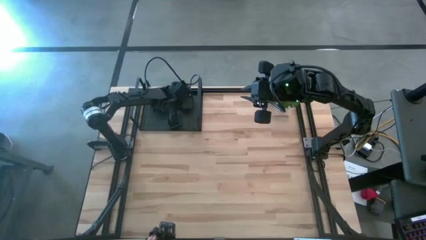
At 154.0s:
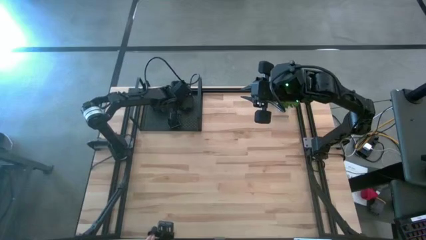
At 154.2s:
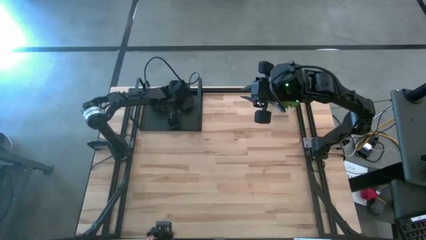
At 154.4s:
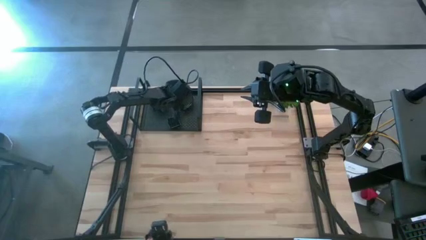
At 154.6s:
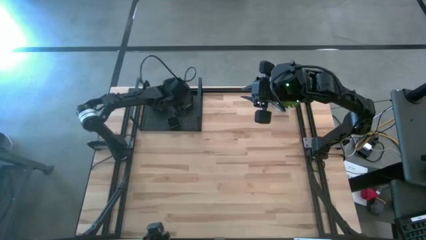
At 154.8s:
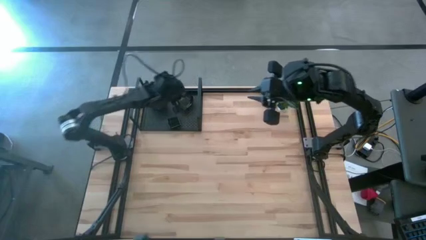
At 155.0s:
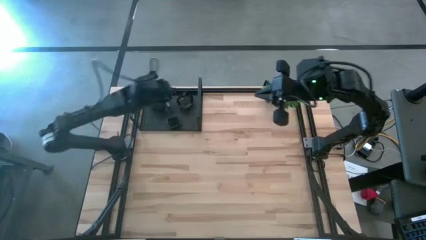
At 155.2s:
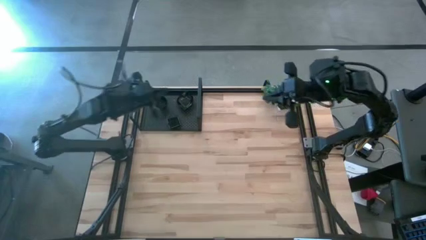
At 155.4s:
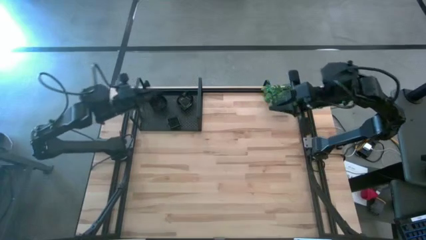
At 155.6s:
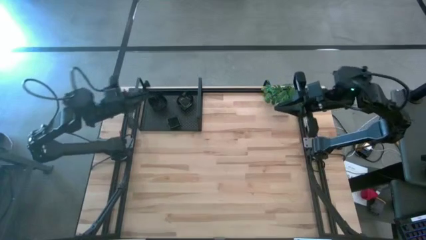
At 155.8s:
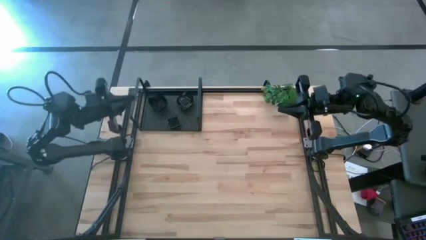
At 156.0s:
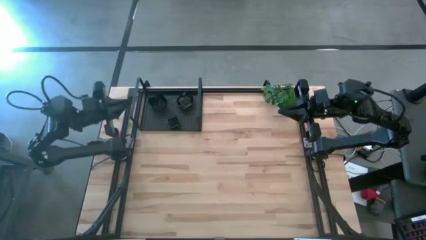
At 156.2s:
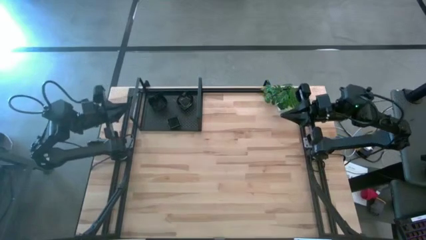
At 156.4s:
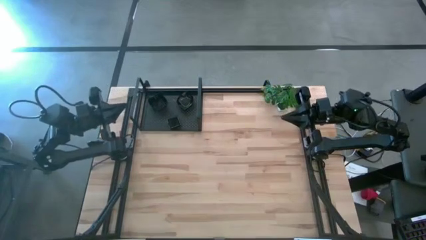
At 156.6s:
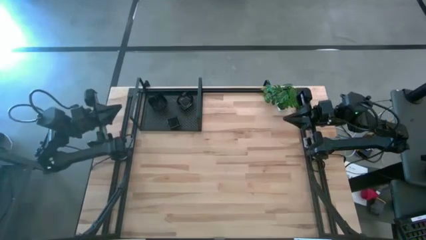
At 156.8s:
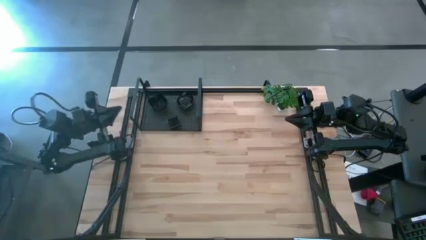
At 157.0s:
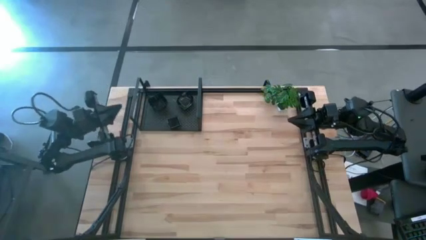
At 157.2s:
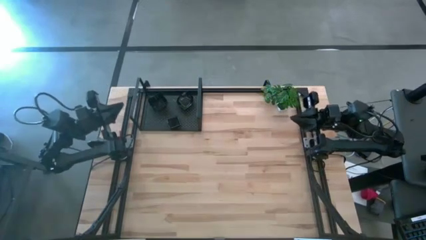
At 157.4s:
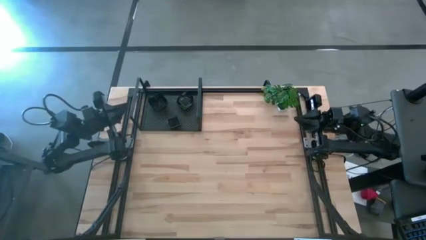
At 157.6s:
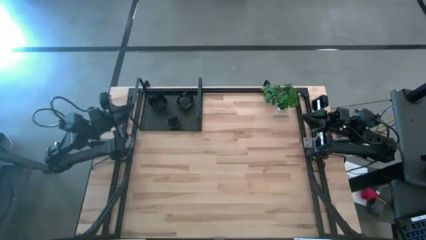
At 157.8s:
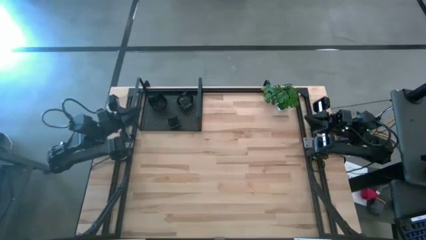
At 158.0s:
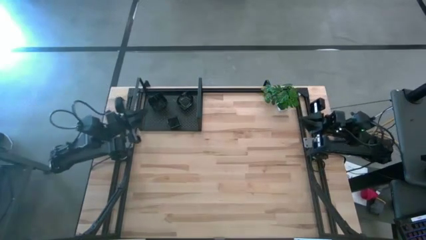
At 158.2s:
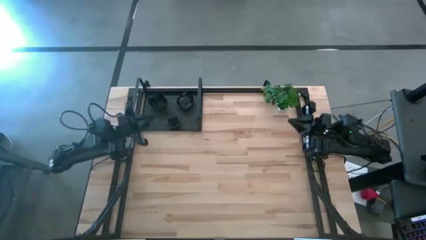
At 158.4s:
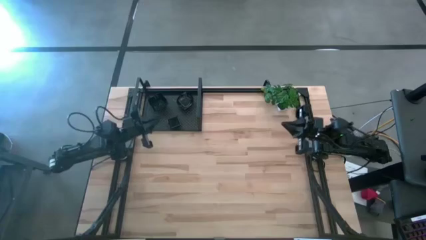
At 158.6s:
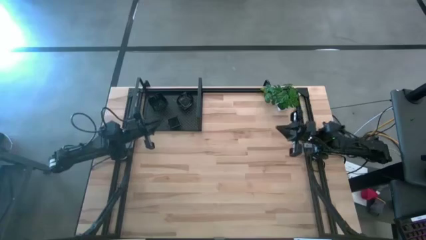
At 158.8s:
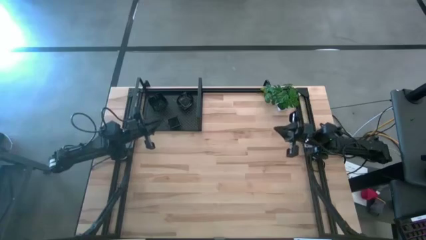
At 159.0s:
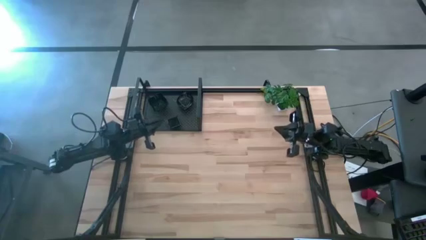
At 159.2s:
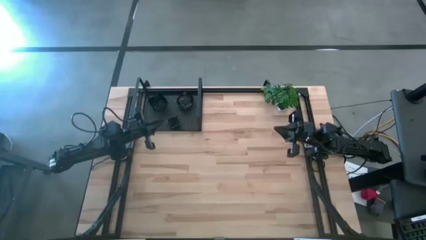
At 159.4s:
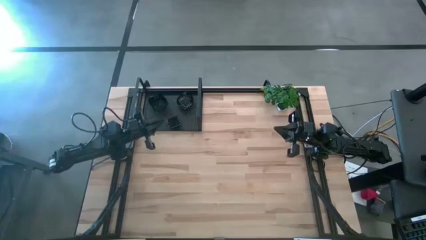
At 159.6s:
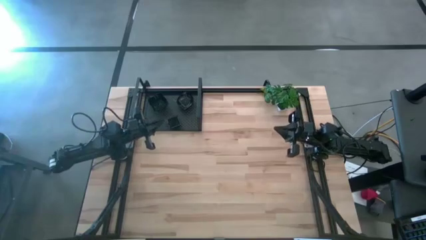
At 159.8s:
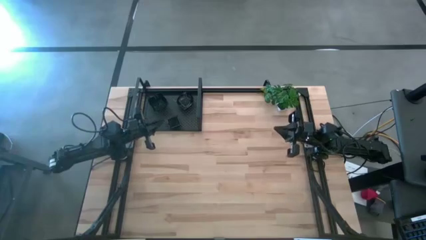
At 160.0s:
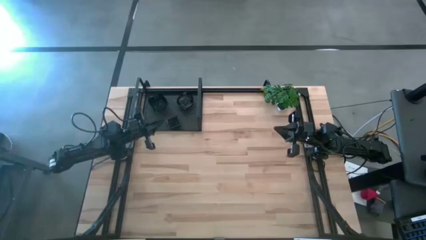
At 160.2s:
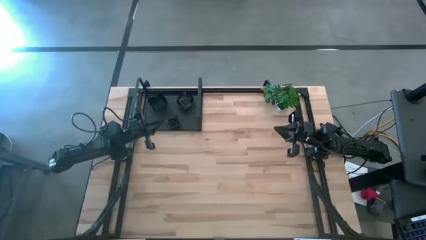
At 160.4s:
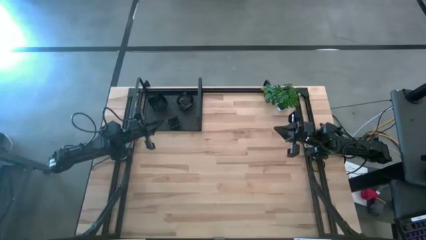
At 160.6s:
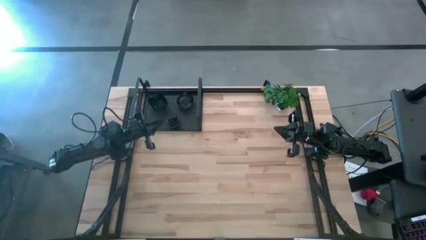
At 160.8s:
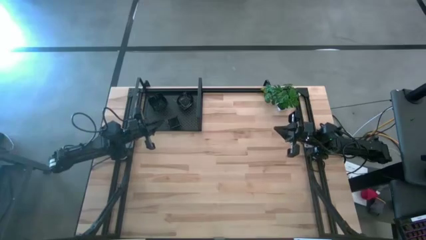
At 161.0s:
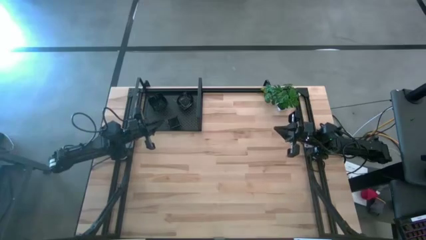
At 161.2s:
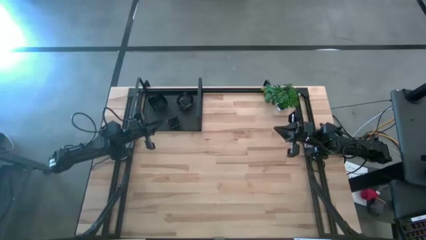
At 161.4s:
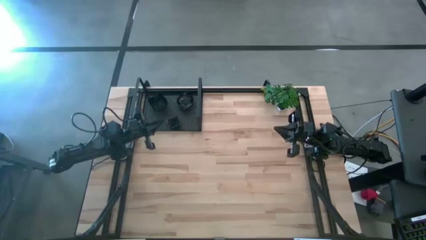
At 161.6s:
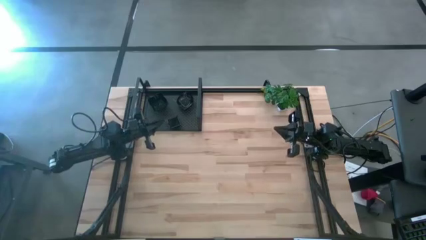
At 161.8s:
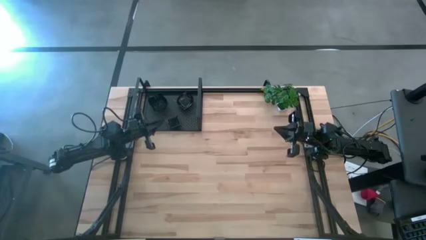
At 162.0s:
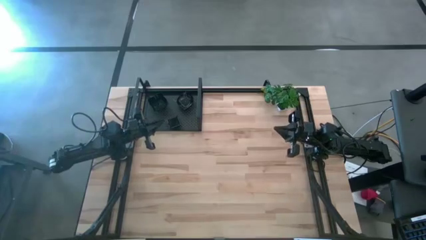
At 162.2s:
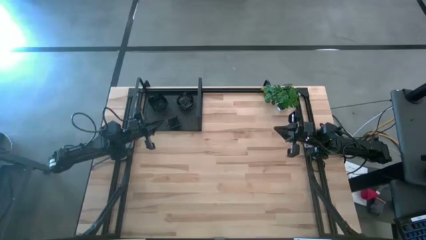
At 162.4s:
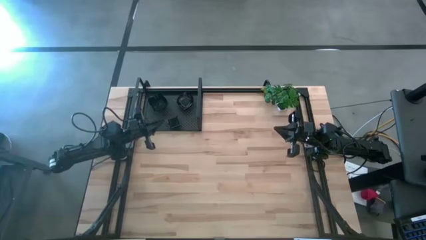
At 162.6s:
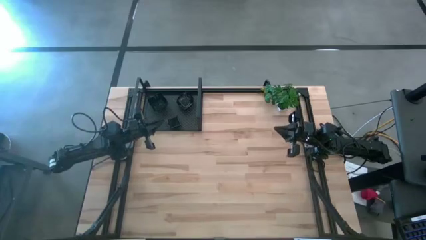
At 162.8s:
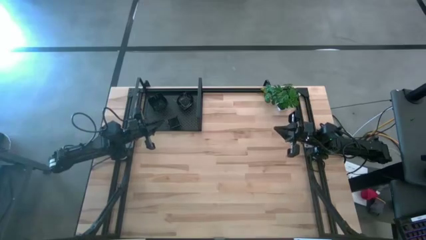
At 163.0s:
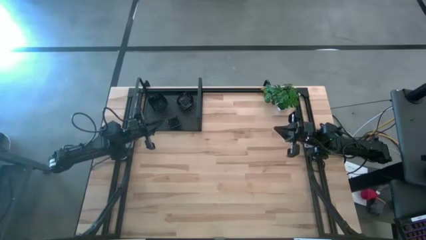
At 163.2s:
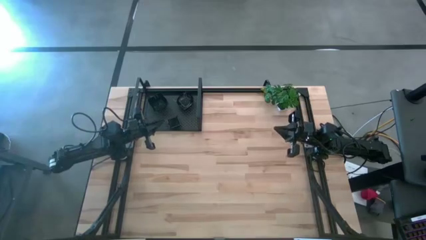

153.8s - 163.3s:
Task: Pick & Place Mini shaped plates
Return to Home Position

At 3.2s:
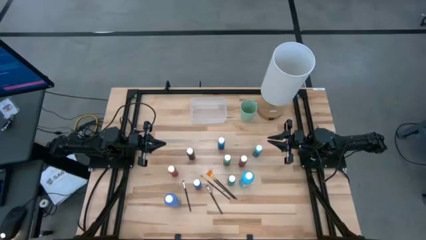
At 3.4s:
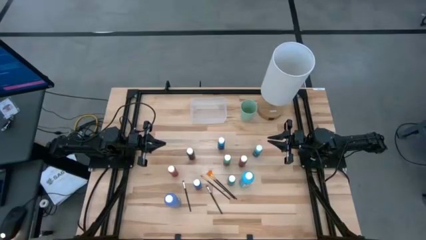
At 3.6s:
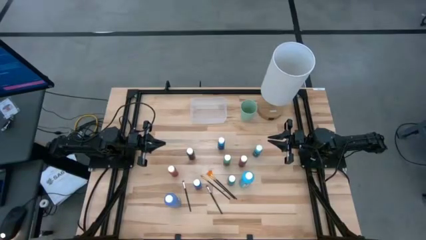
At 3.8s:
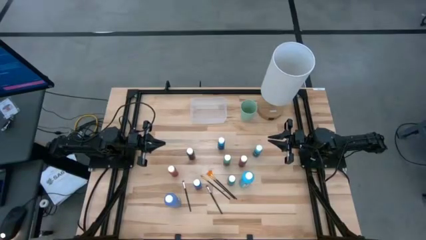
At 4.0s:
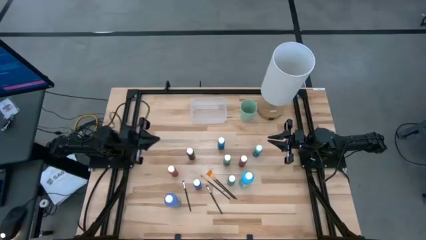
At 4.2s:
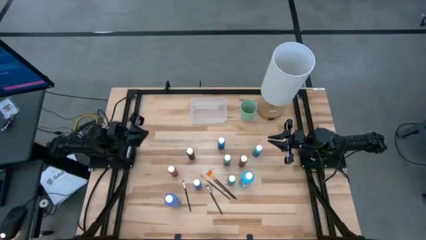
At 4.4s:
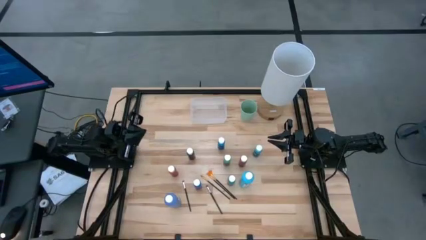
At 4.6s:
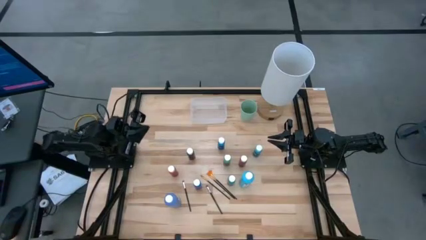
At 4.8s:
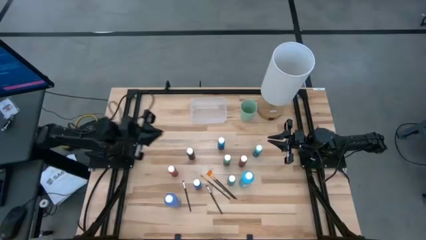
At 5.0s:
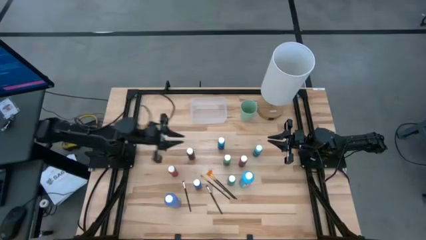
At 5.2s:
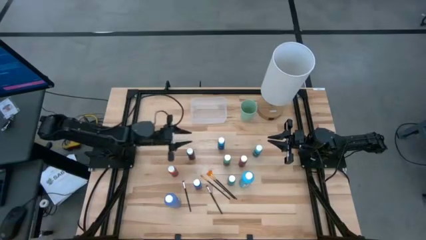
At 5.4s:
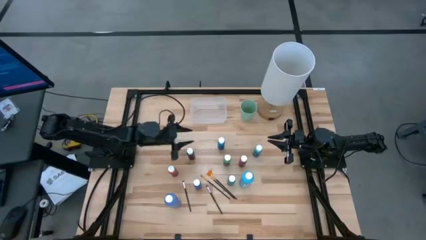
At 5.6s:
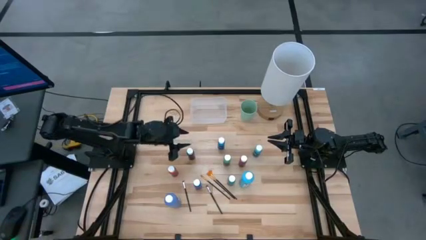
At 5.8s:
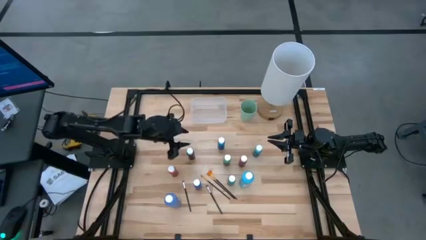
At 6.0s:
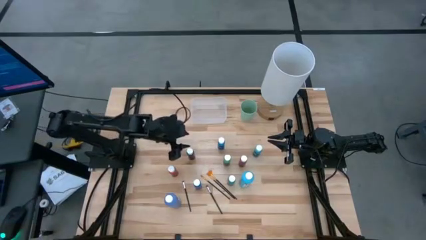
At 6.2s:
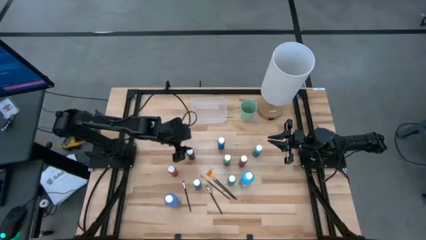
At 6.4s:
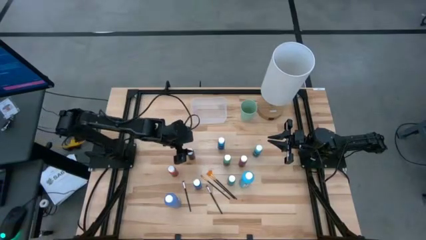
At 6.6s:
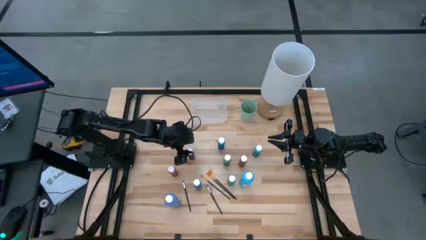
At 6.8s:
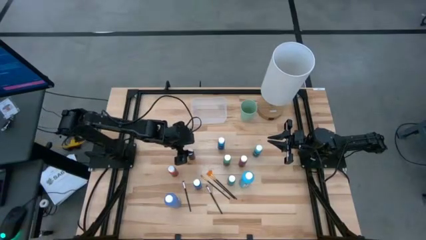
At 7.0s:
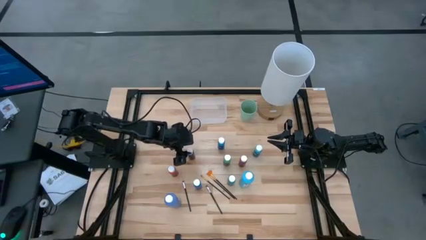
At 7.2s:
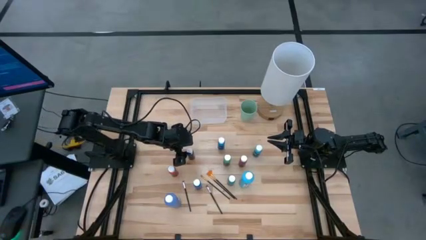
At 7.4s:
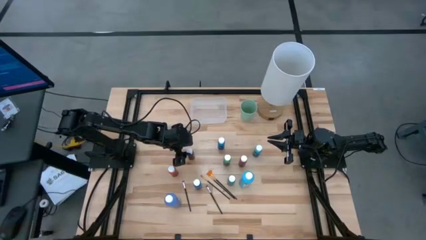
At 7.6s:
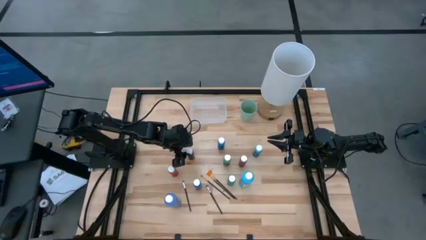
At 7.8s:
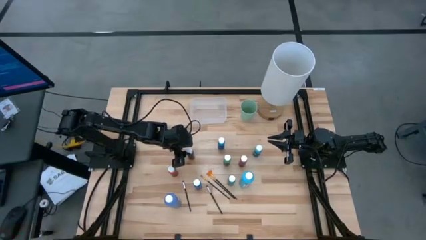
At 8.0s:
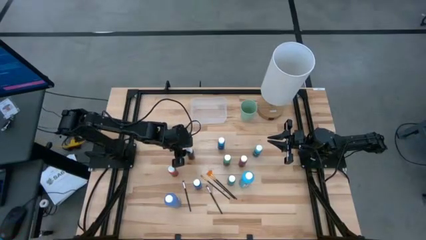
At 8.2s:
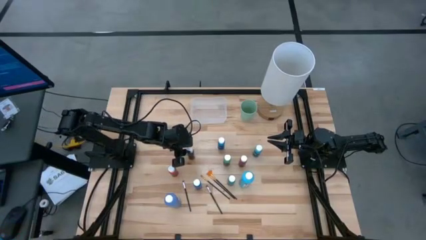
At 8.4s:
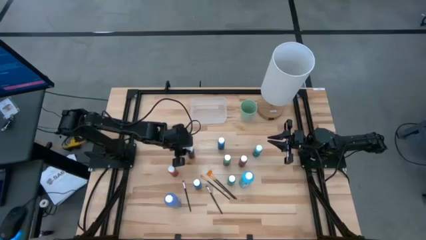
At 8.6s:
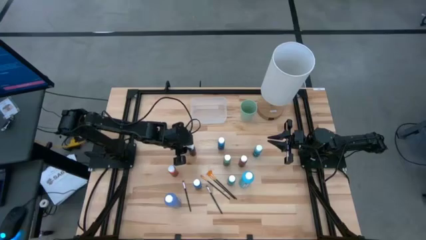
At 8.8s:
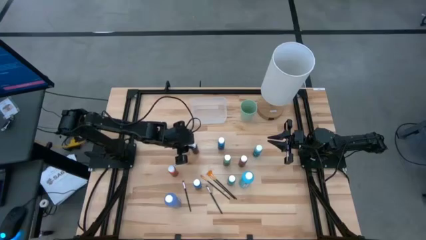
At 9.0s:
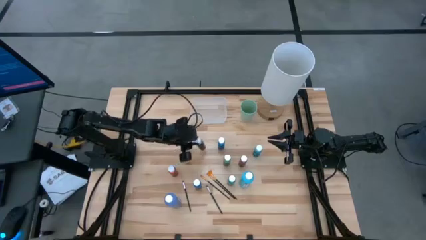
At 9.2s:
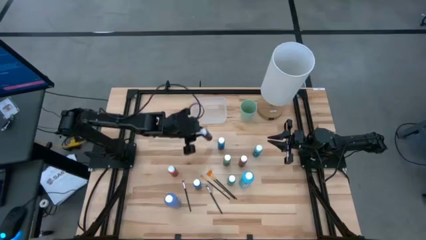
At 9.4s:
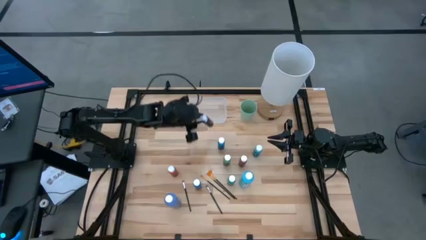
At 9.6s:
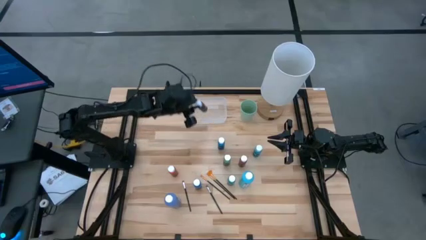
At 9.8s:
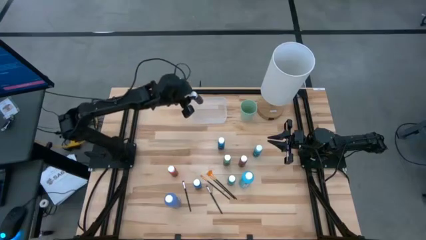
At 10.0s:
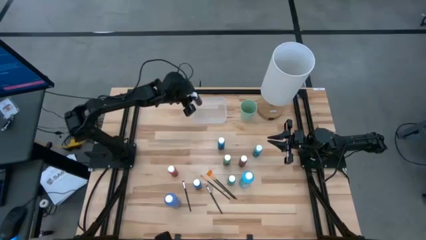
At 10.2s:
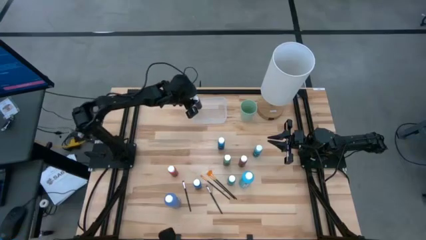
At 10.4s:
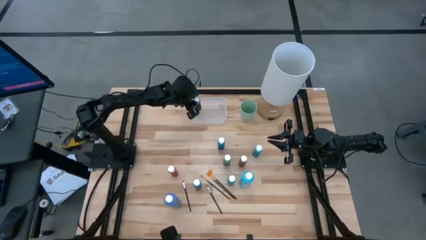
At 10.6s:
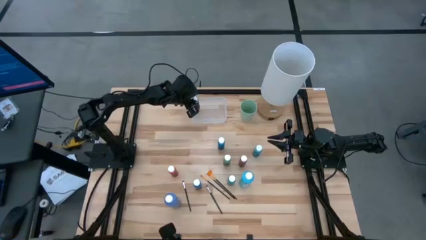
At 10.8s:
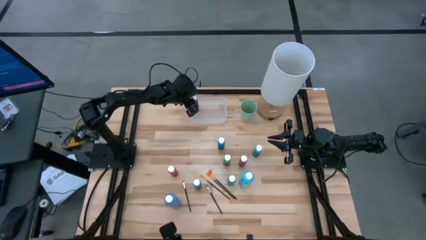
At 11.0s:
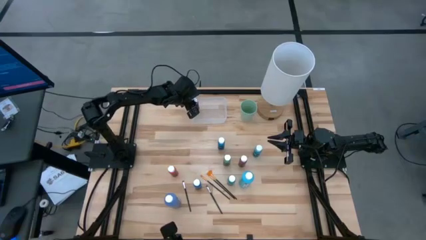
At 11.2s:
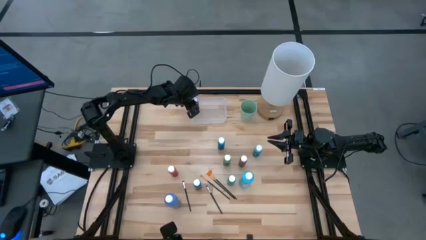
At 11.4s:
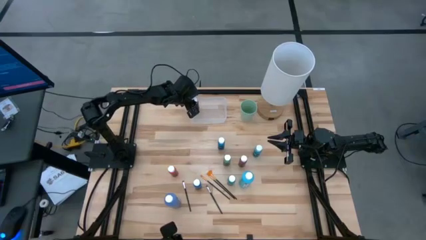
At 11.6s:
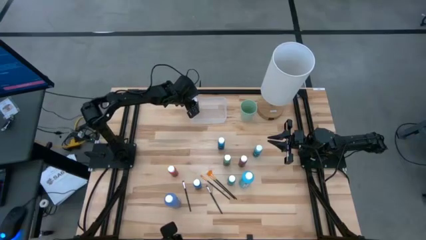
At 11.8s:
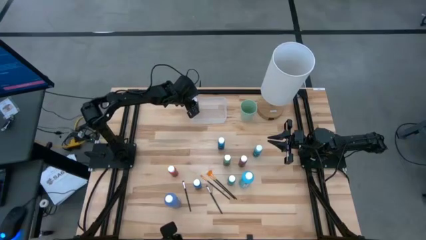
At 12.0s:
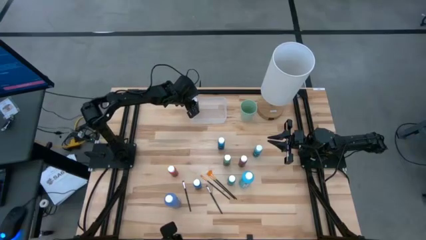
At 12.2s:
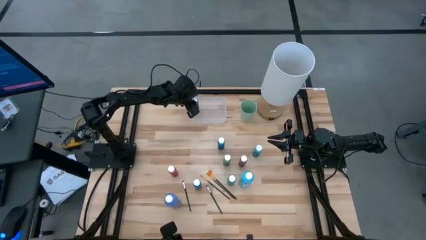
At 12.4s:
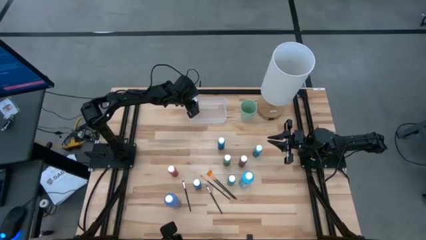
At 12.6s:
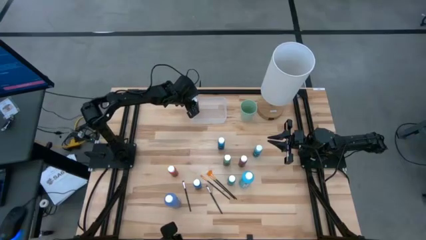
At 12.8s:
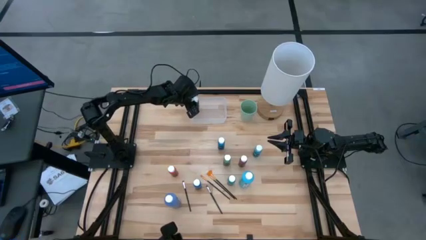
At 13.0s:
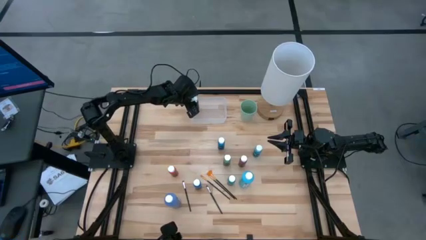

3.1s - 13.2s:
Task: Pick & Place Paint Supplies
Put the small black paint bottle into the transparent bin
